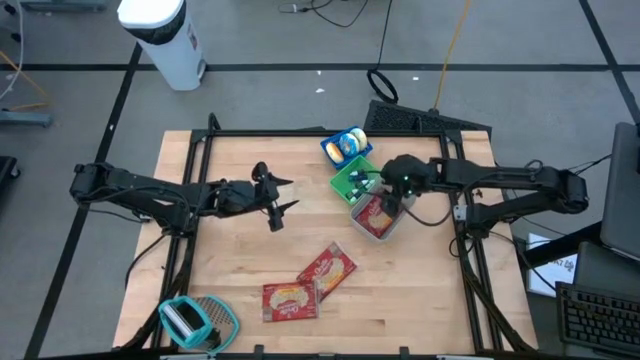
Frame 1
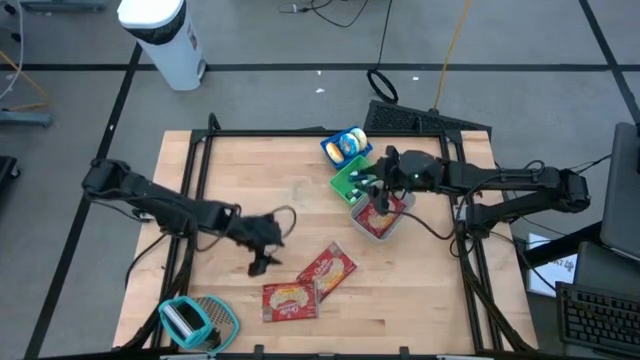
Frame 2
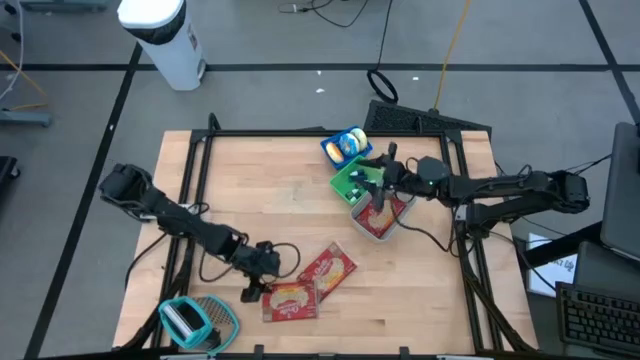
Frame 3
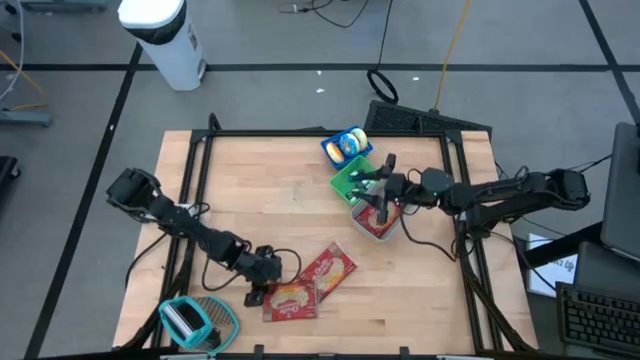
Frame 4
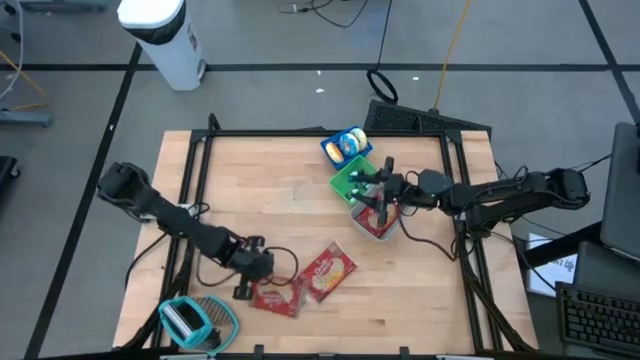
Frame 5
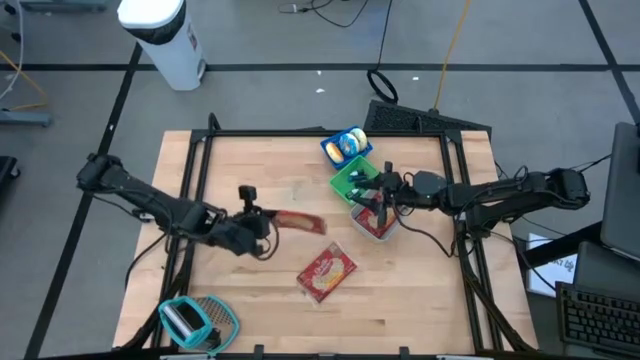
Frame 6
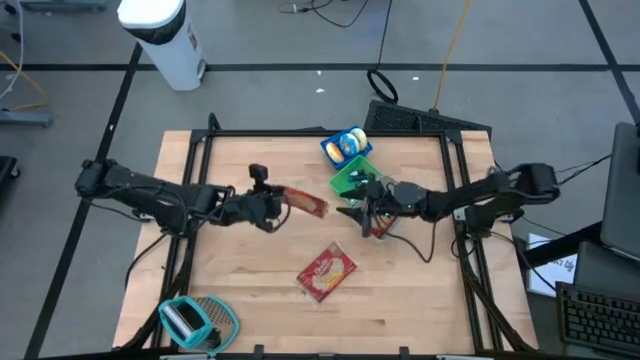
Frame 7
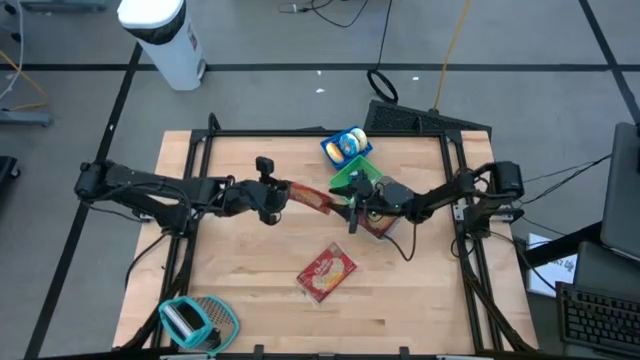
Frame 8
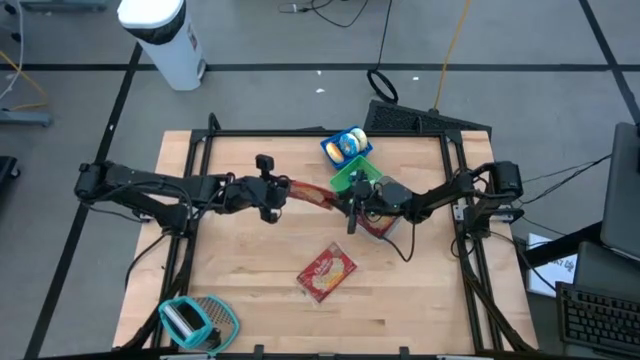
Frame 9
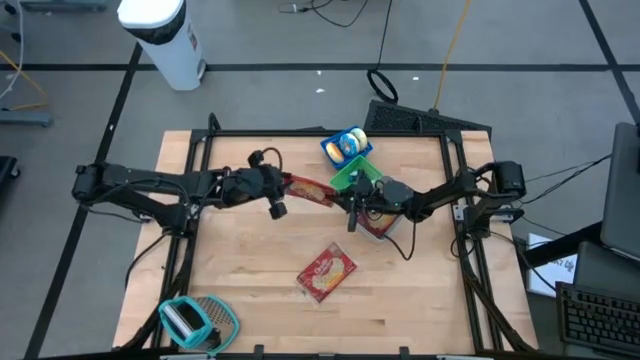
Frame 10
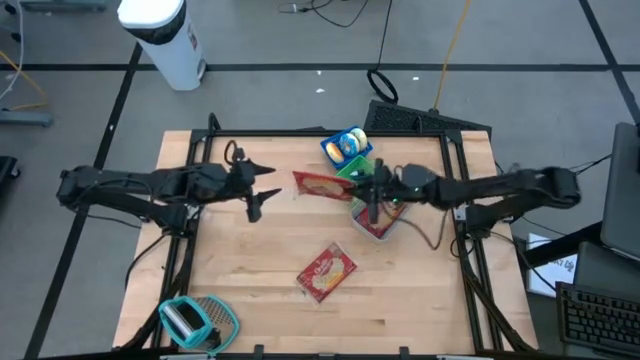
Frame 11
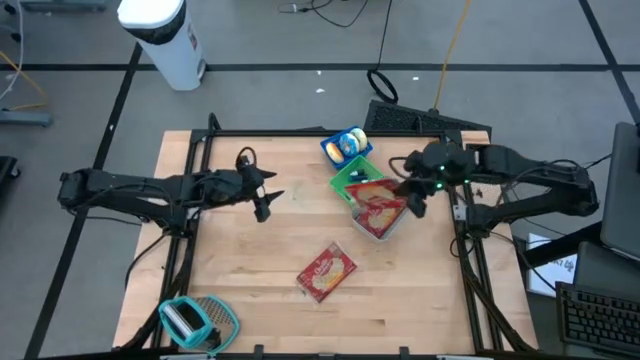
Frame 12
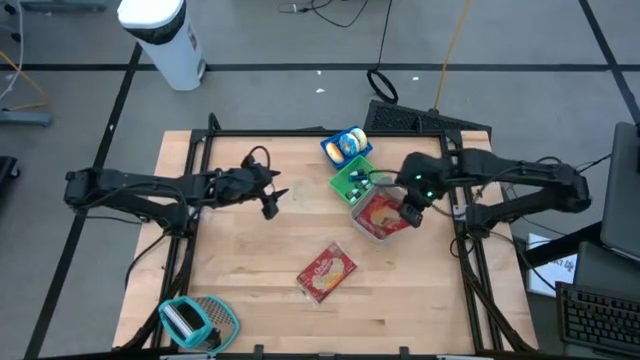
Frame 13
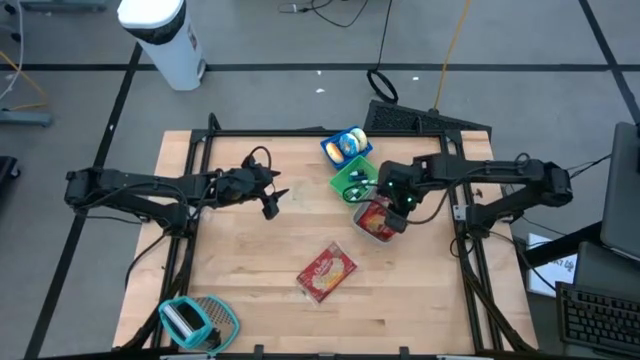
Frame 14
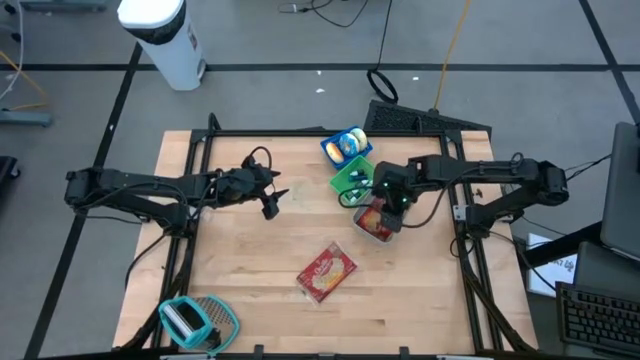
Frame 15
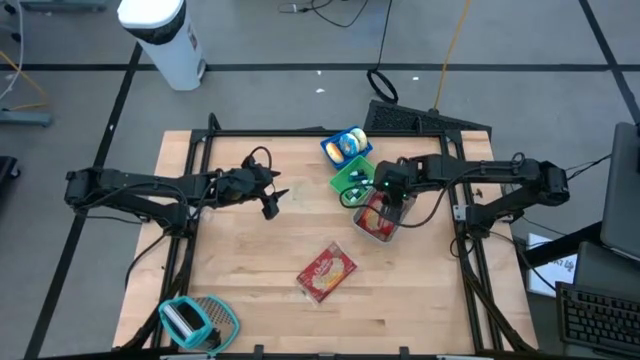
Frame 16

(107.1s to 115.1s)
Put the bottom red popcorn bag into the gray bin

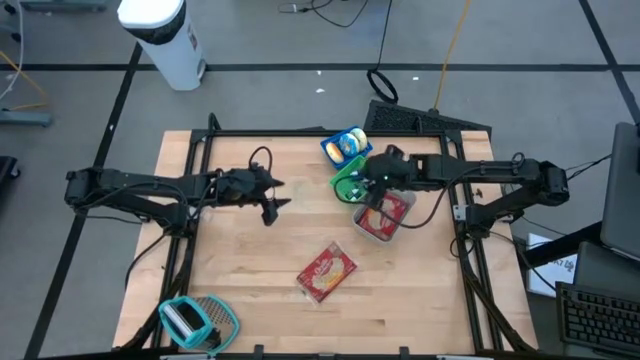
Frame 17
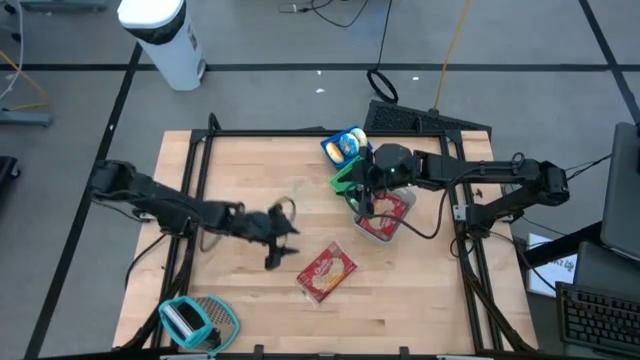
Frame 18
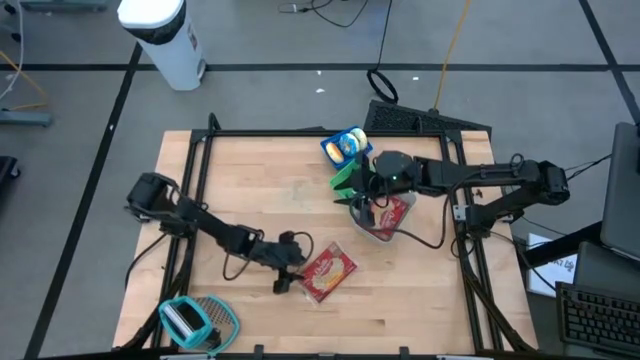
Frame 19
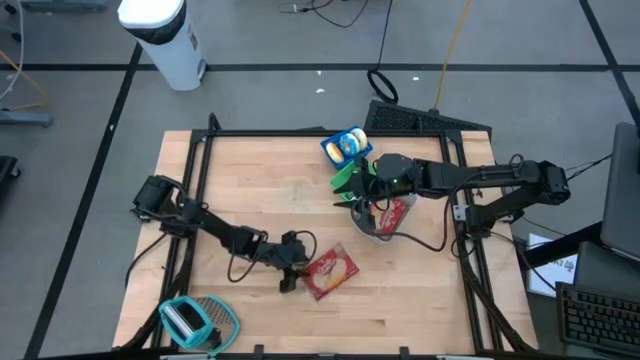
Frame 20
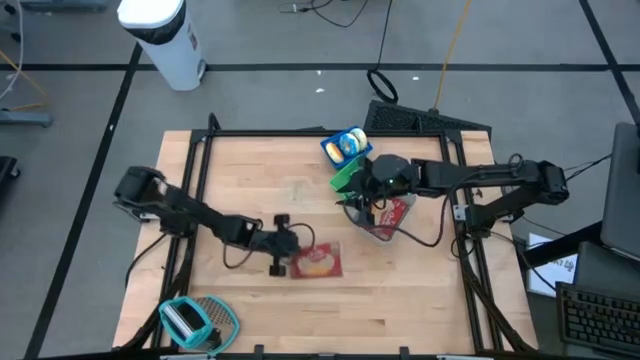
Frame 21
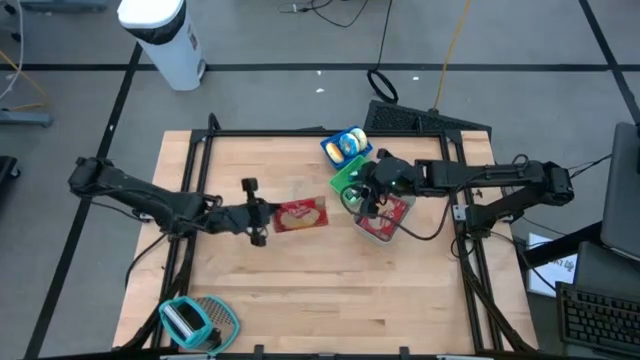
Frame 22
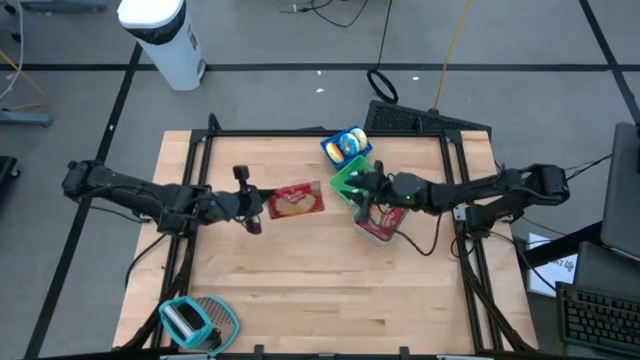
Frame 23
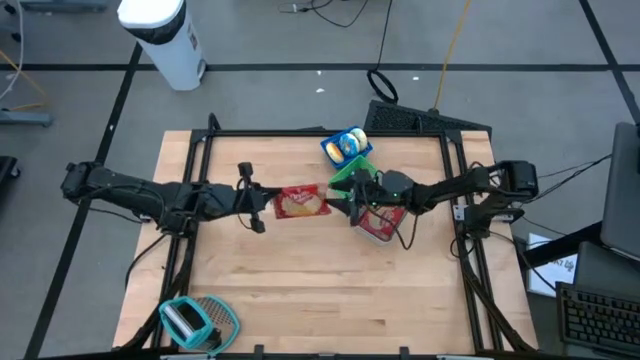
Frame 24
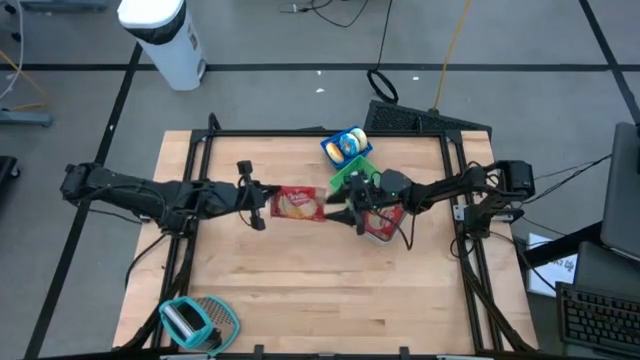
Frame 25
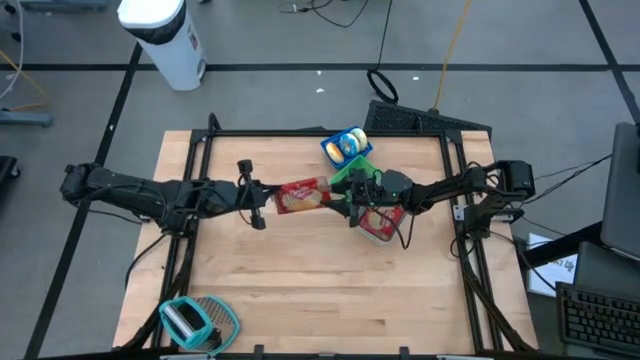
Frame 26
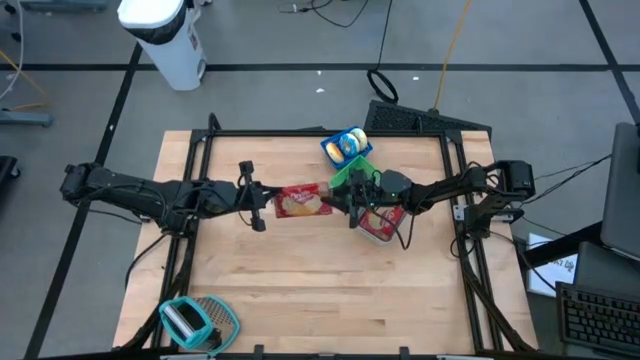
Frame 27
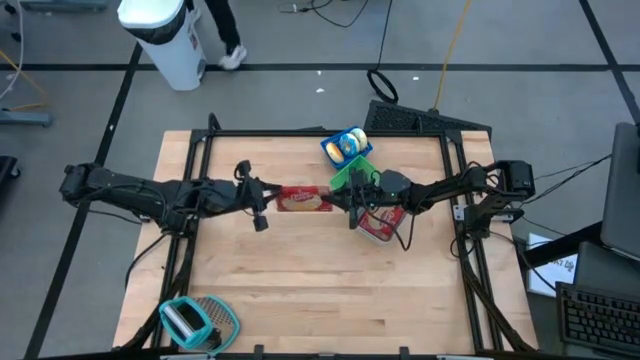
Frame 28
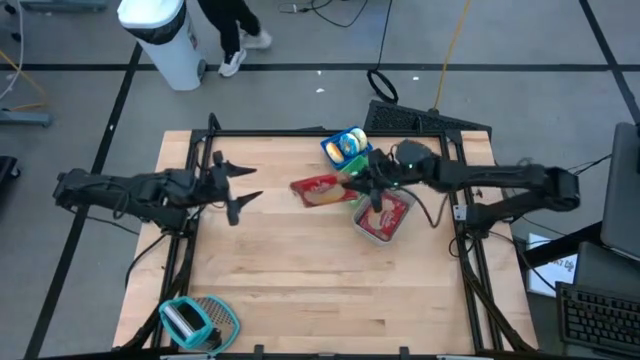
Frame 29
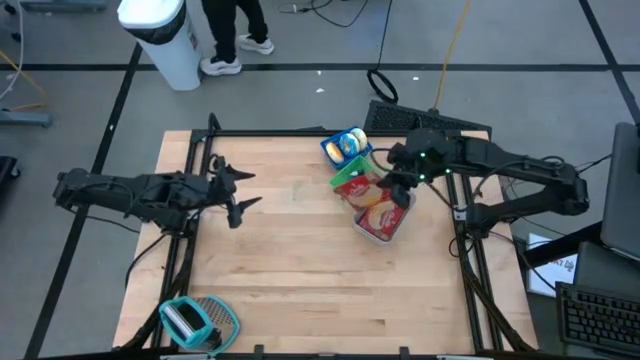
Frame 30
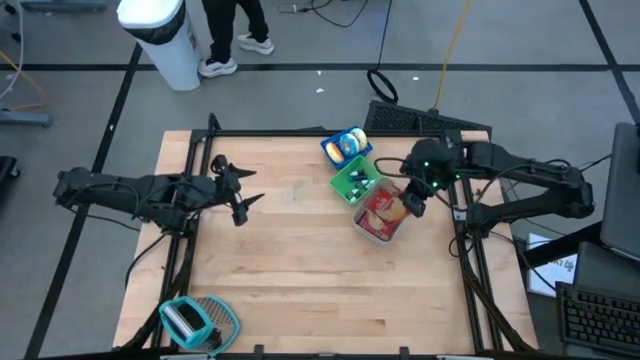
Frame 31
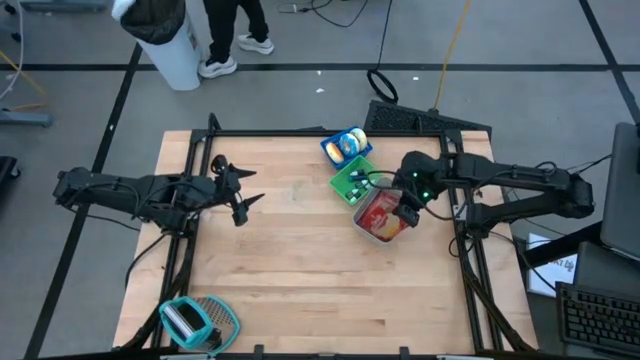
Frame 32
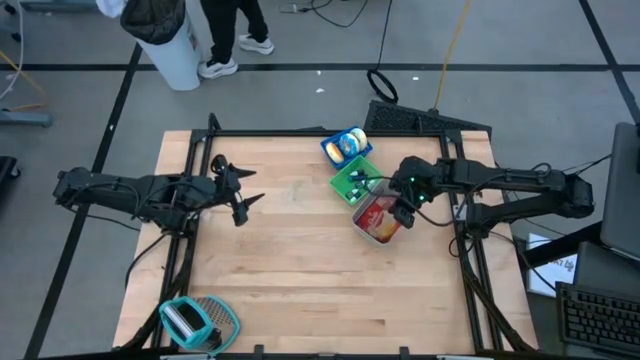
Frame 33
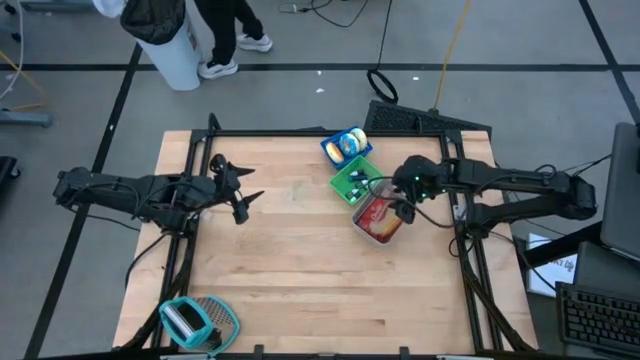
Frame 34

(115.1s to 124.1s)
Put the red popcorn bag into the gray bin

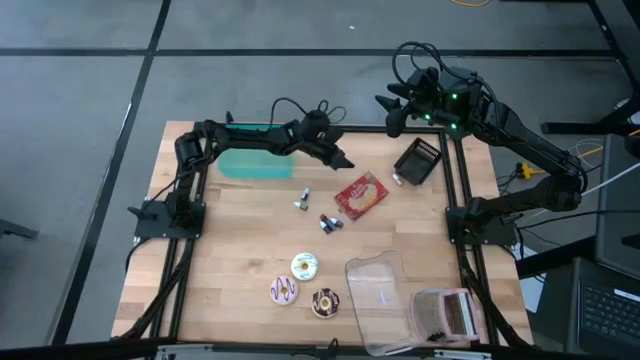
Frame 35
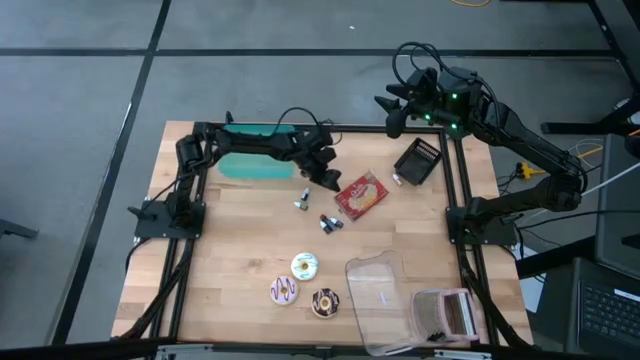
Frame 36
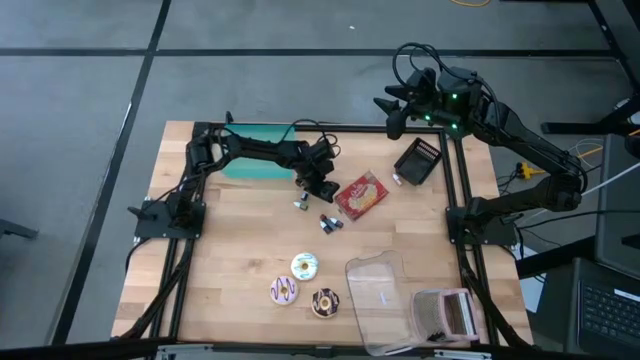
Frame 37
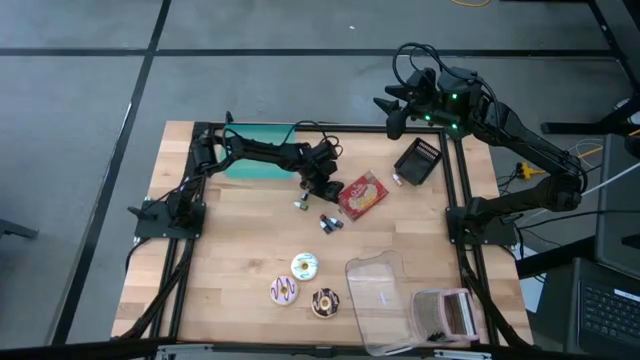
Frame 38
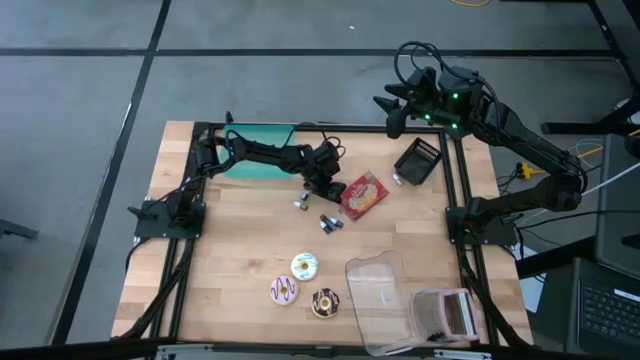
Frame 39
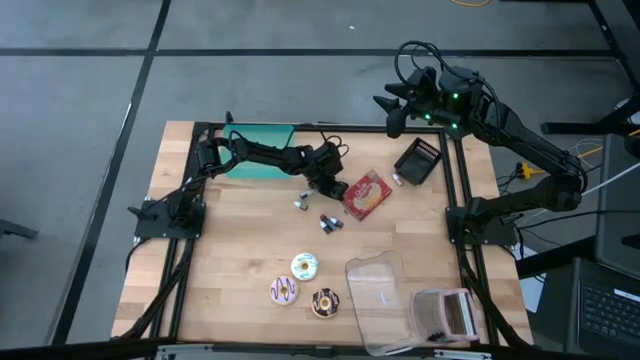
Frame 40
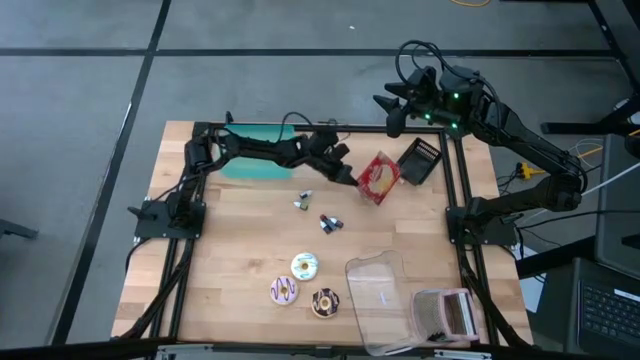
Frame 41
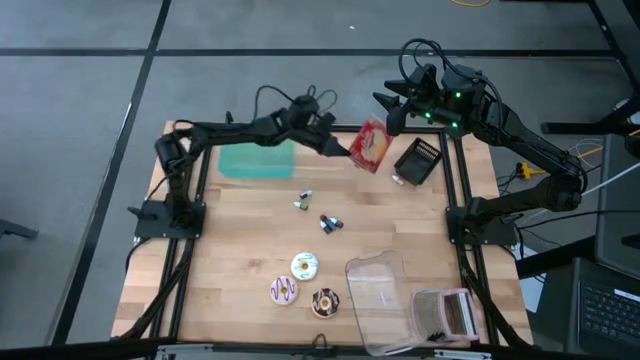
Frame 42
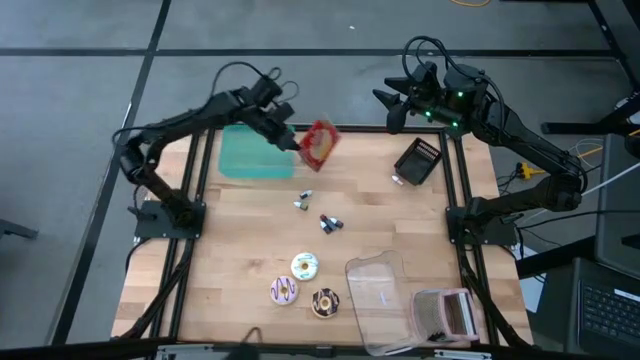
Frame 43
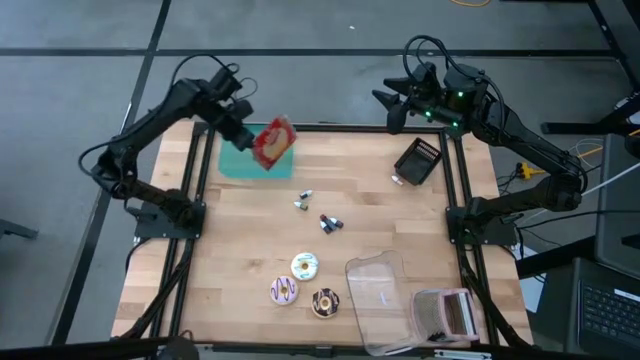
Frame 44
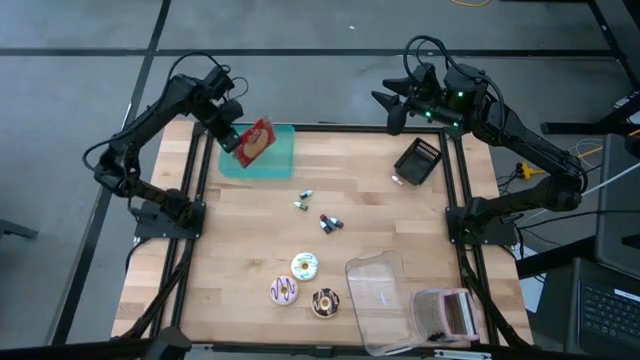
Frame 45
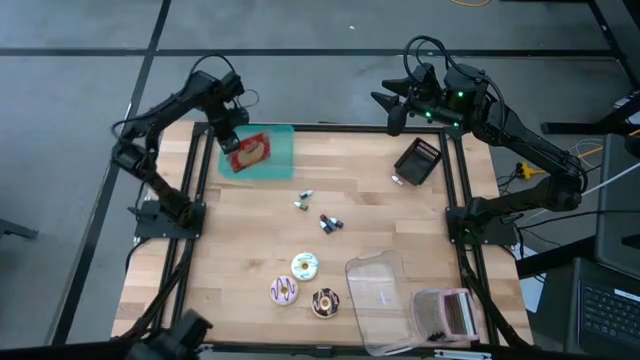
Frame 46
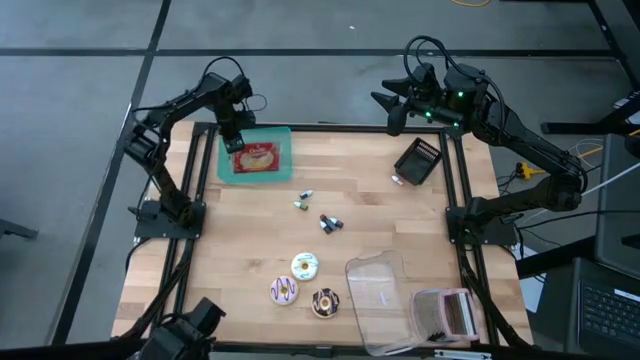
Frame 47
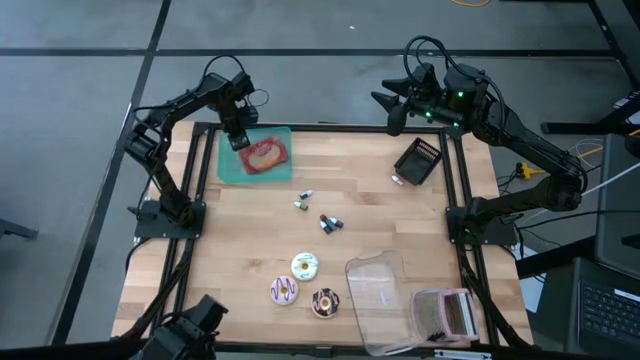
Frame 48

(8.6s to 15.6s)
Put the popcorn bag into the light blue bin
